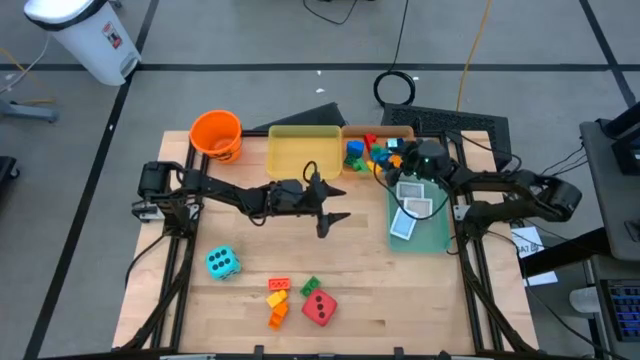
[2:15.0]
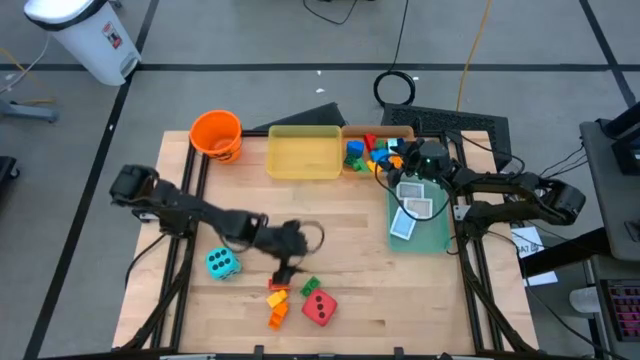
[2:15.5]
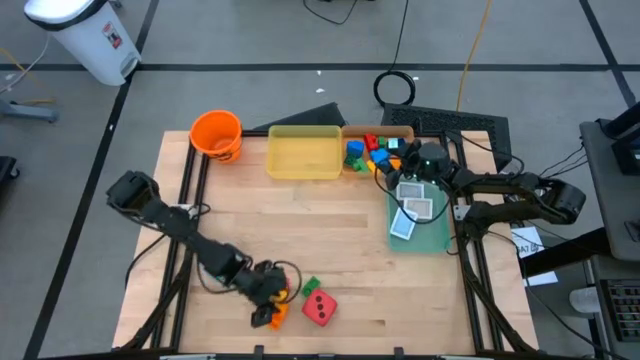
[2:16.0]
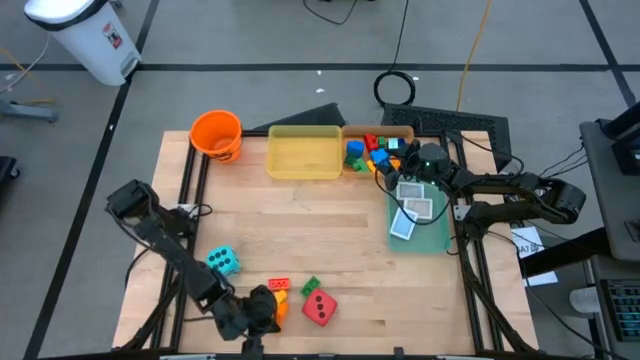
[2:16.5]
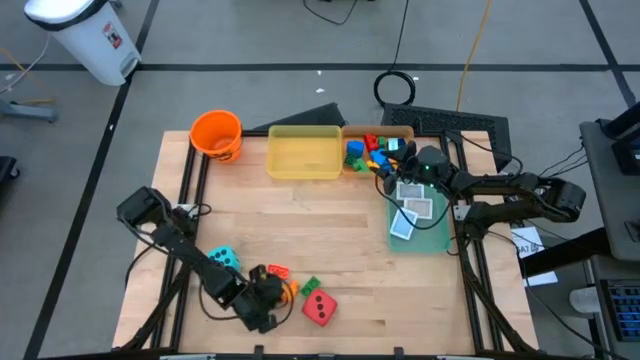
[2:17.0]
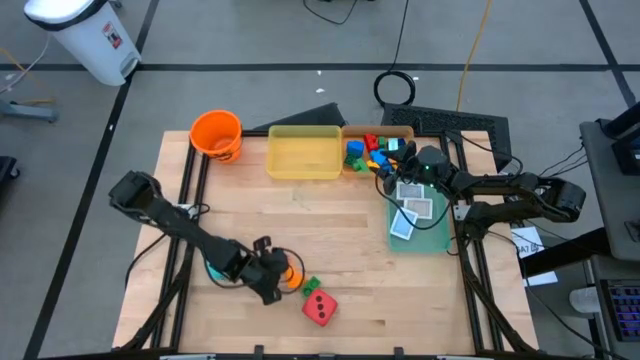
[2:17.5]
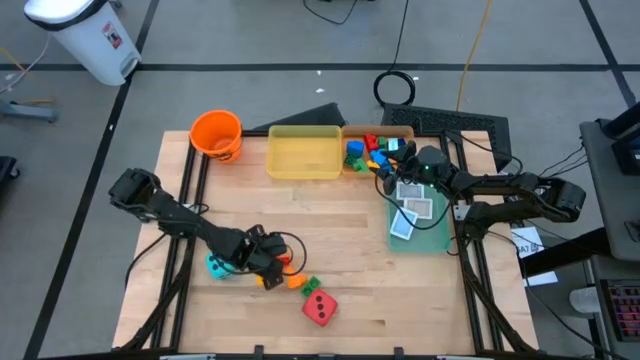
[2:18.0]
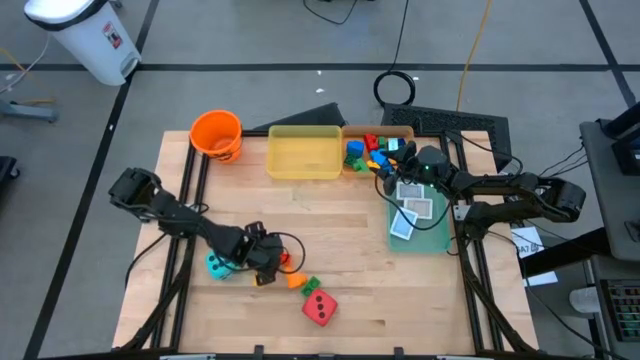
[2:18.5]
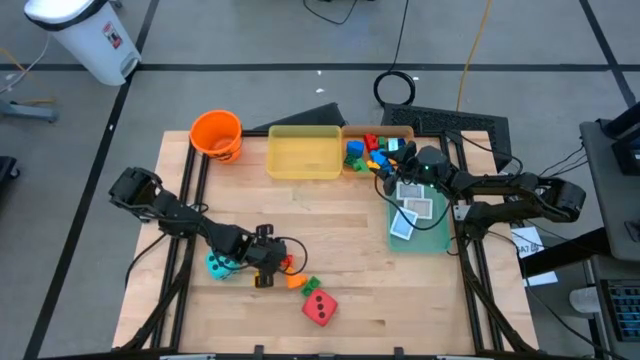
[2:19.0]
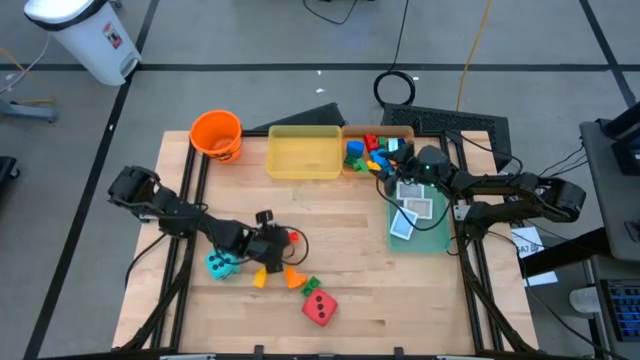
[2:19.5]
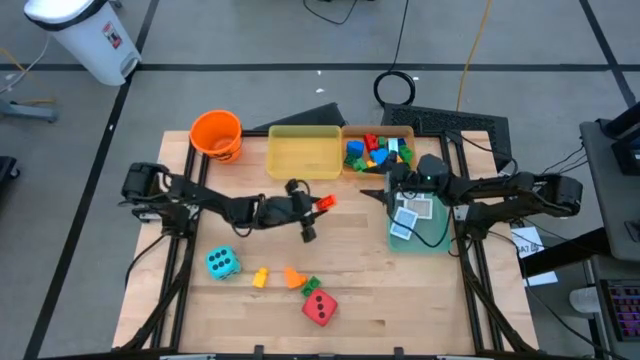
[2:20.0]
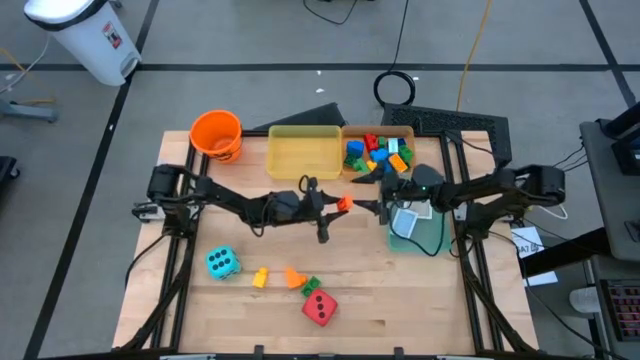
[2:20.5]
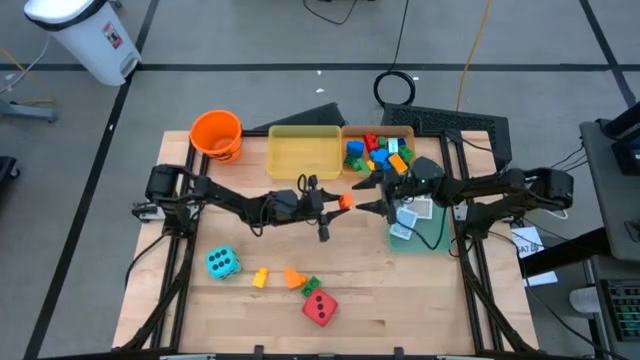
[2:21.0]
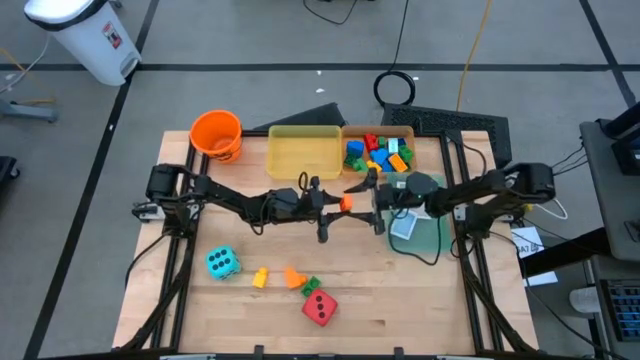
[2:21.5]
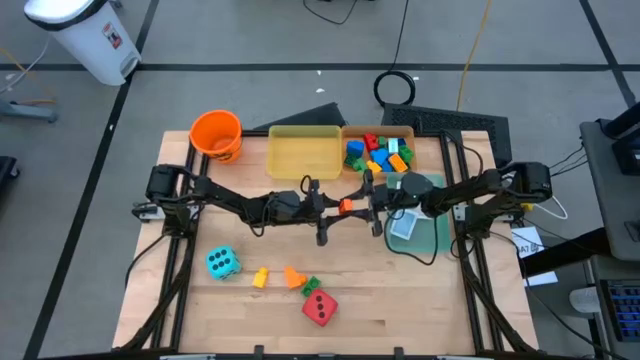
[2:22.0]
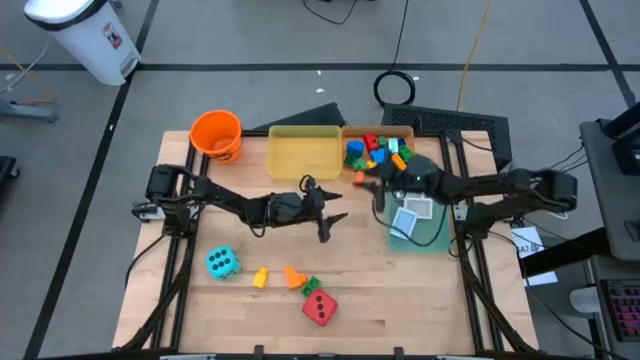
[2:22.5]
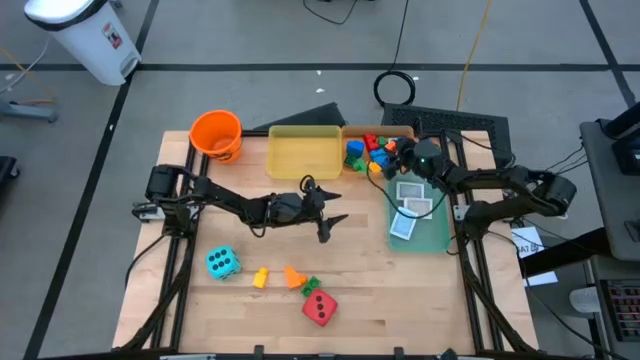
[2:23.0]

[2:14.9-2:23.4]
Task: Pick & Place Toys
Put the orange game piece into the orange bin

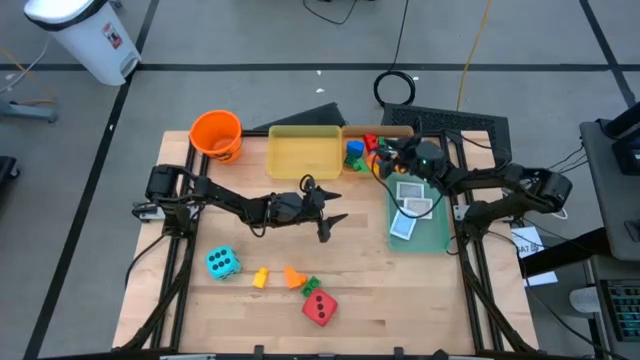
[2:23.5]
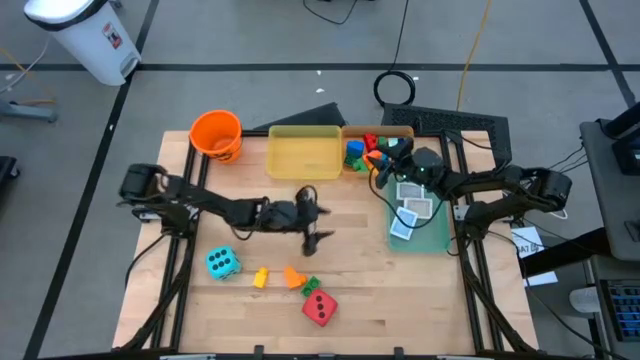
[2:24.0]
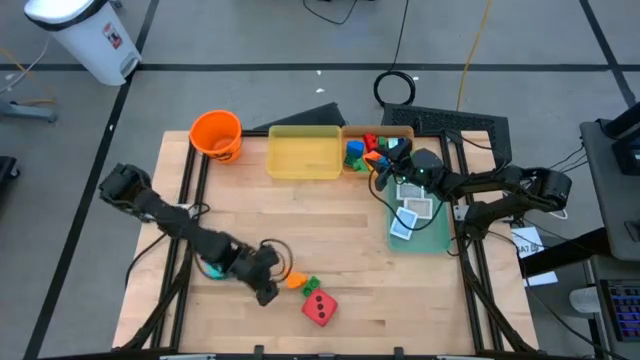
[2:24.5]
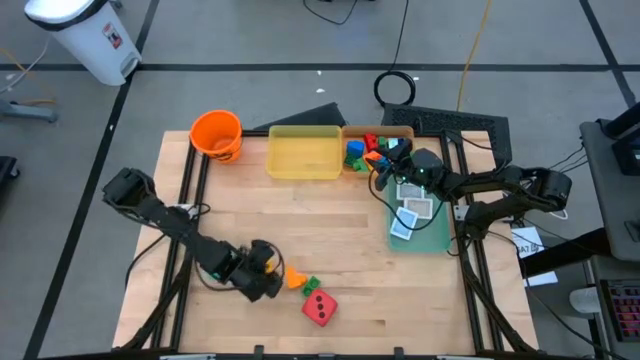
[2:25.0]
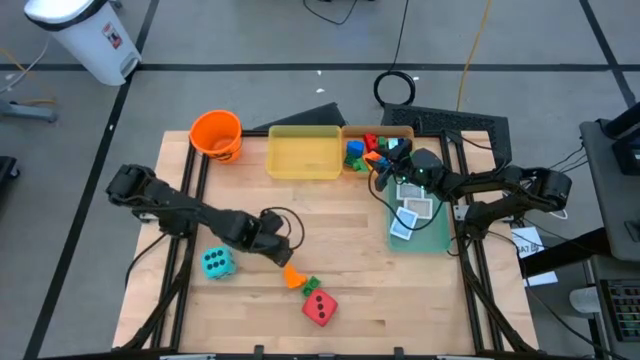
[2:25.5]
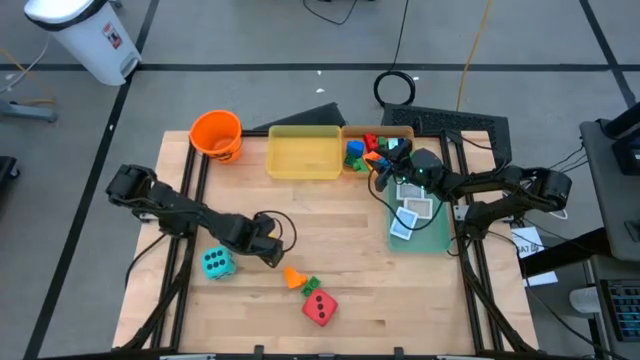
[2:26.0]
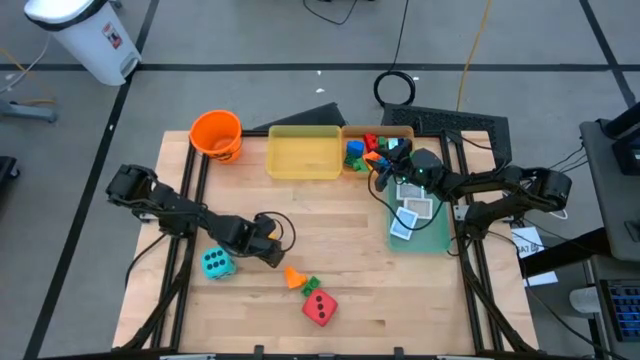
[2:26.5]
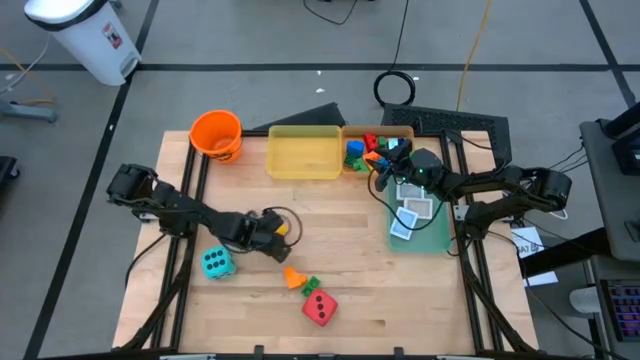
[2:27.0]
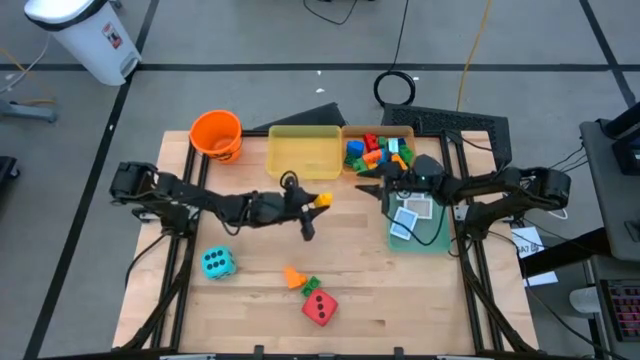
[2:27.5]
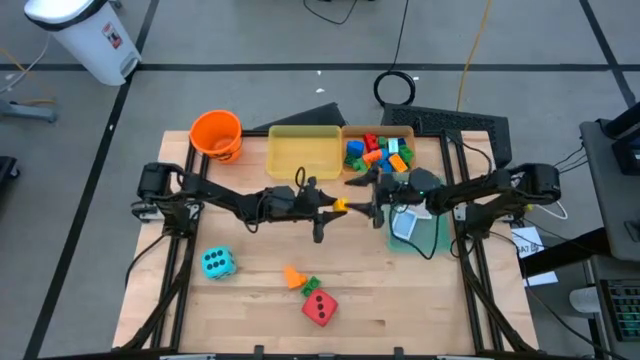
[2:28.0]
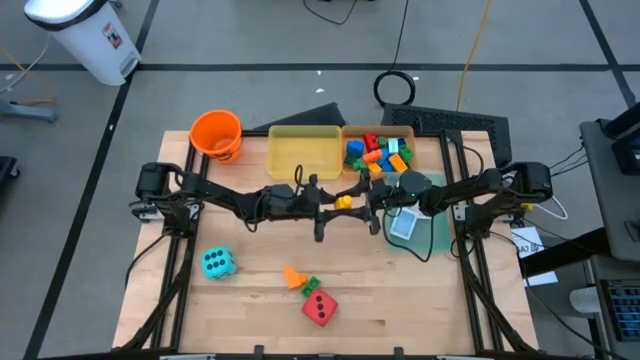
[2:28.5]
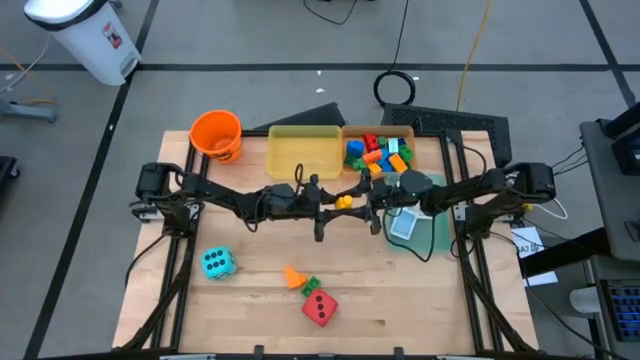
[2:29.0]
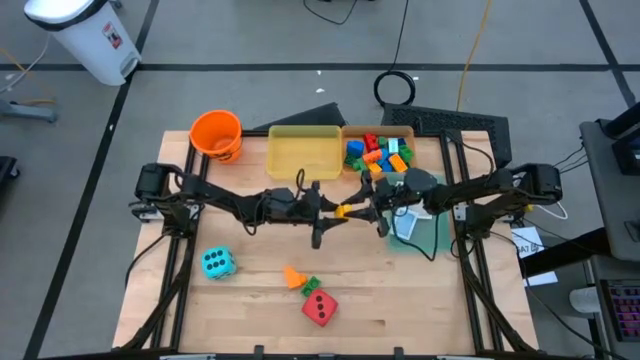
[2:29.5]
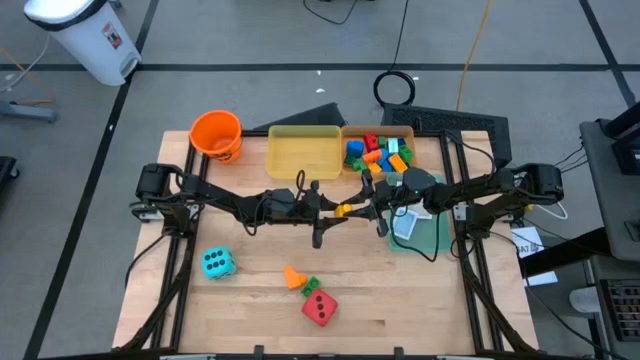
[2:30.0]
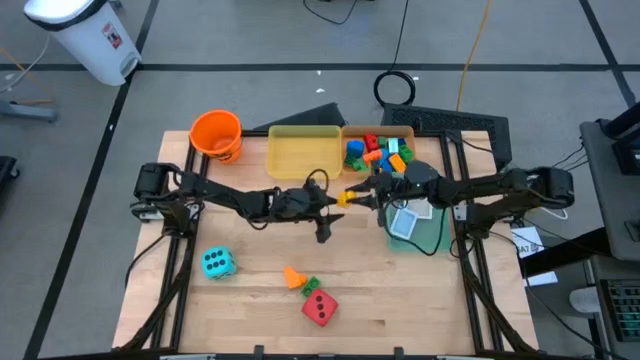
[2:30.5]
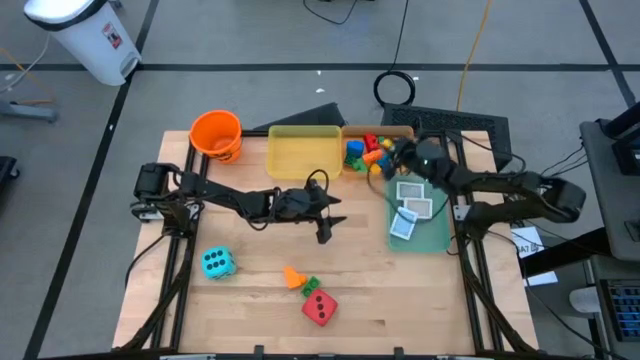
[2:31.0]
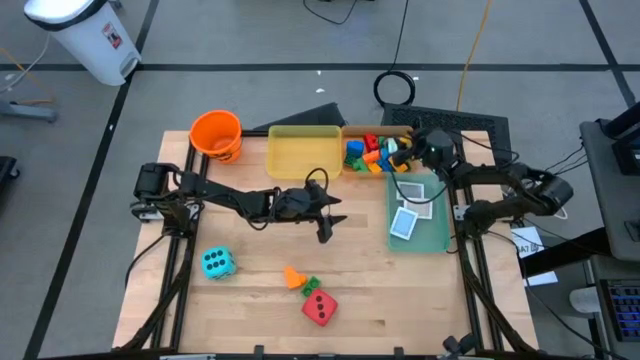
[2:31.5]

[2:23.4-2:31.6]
Put the yellow game piece into the orange bin

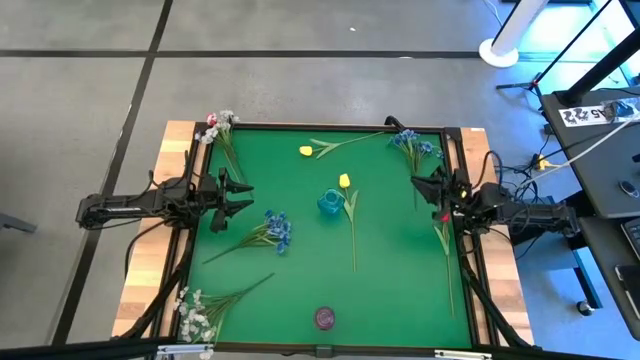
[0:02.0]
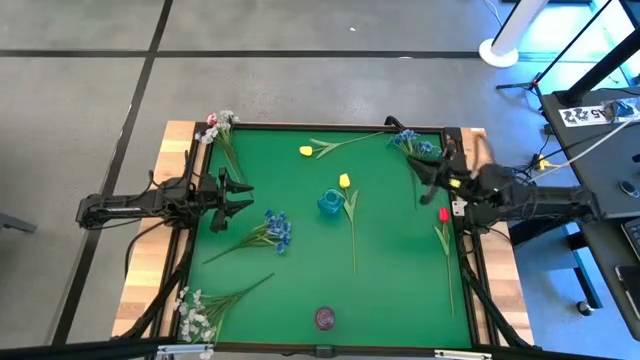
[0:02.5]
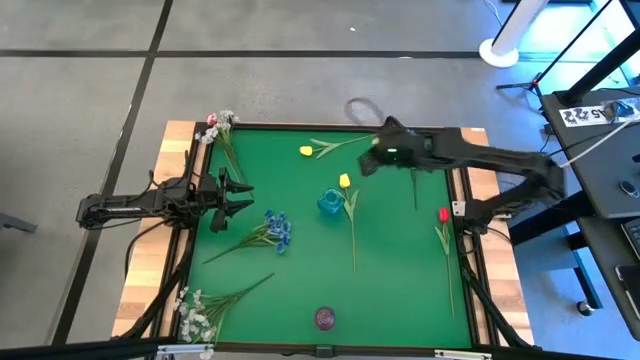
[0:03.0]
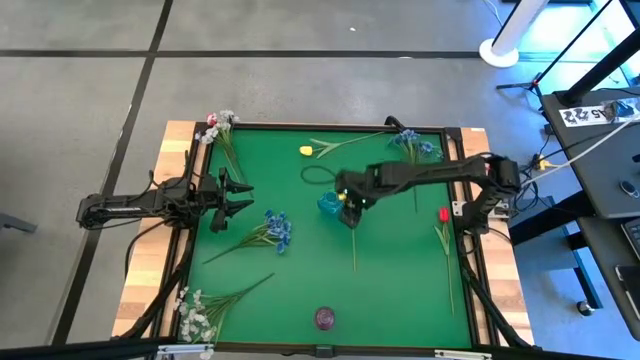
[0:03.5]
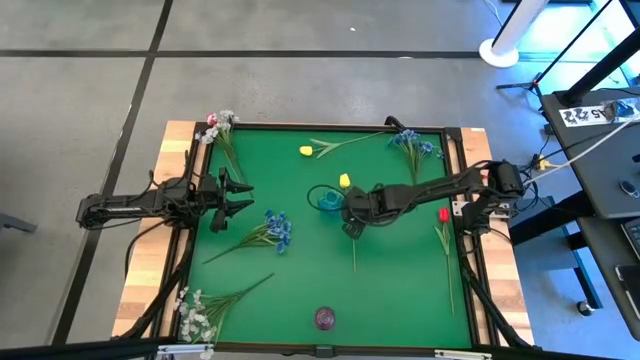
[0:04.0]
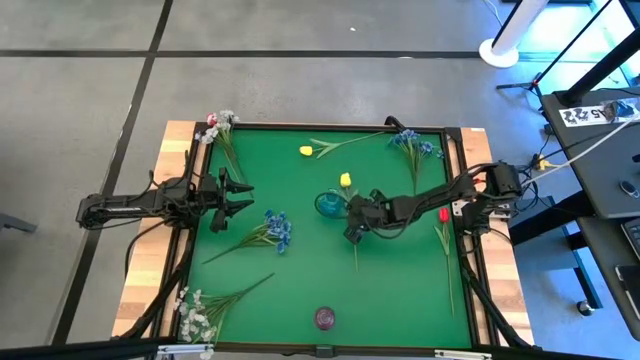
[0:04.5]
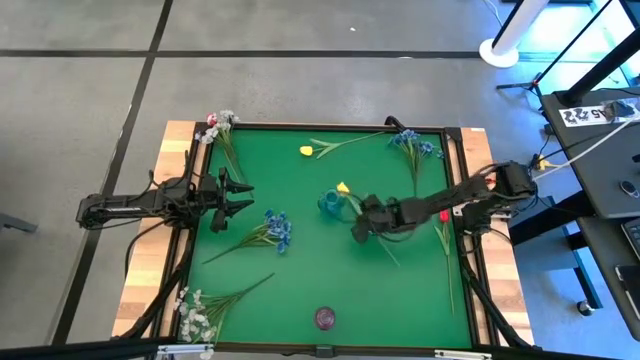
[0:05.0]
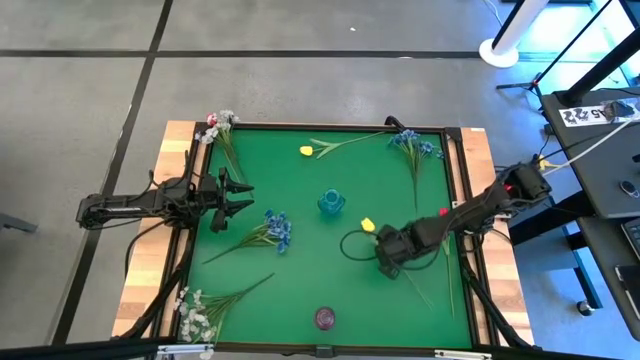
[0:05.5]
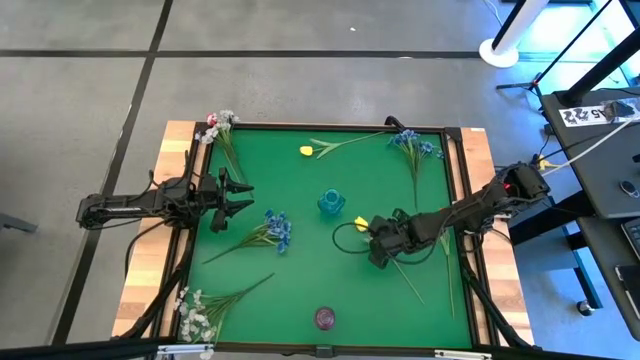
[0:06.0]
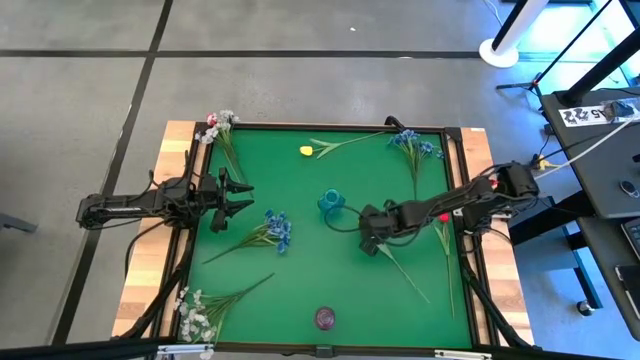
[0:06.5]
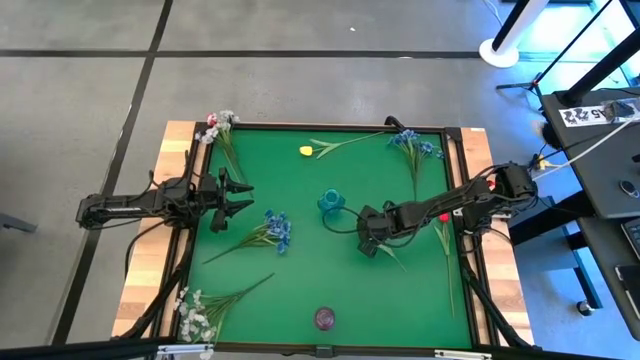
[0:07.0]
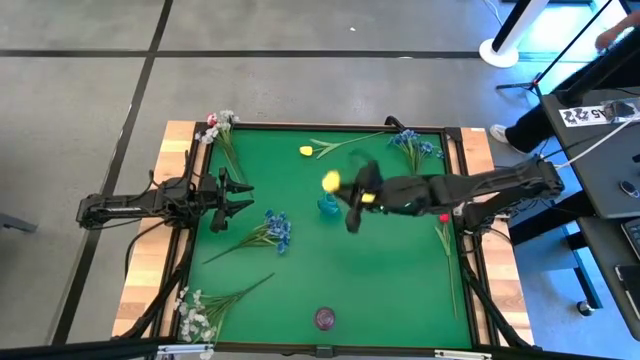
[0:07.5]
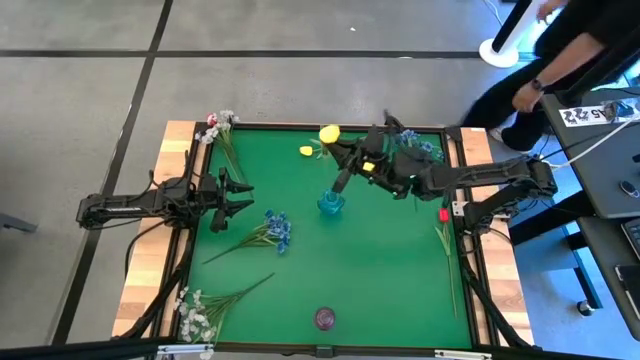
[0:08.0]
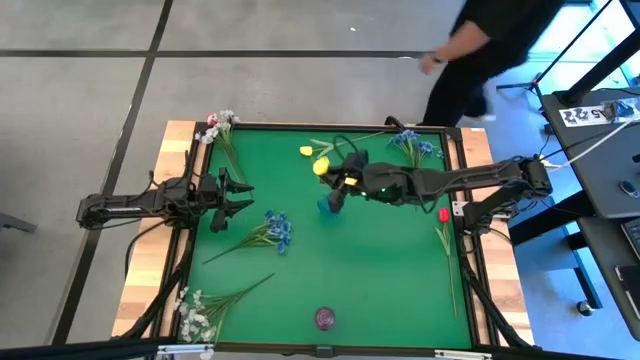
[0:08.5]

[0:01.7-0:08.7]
Task: Sort flowers into vase by color
Put the bottom yellow tulip into the blue vase
